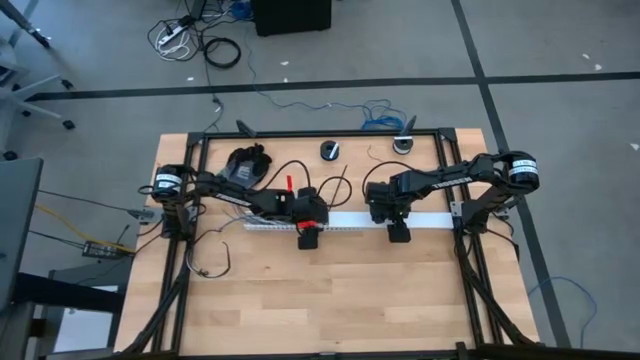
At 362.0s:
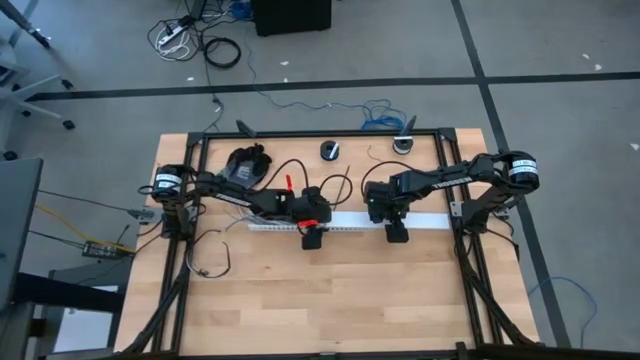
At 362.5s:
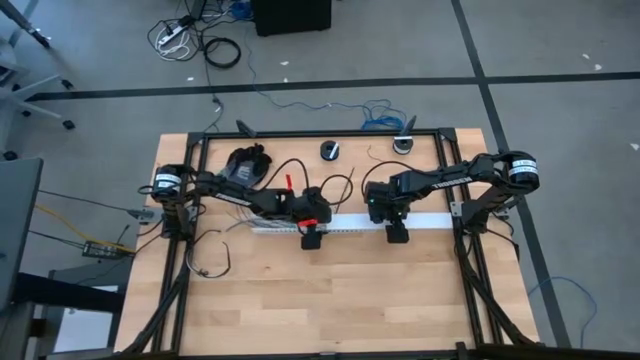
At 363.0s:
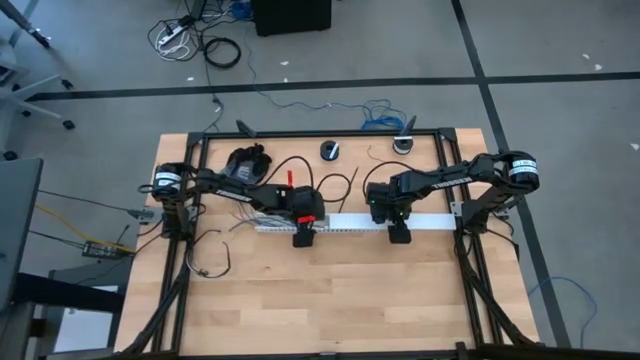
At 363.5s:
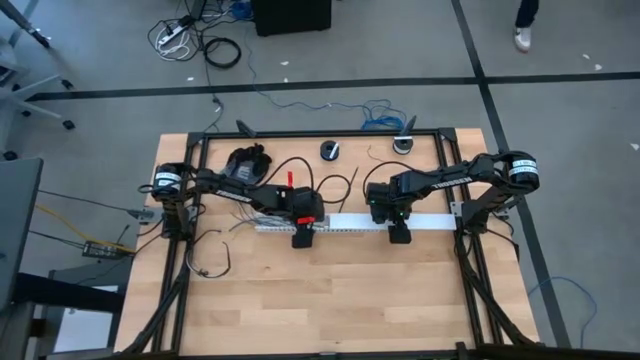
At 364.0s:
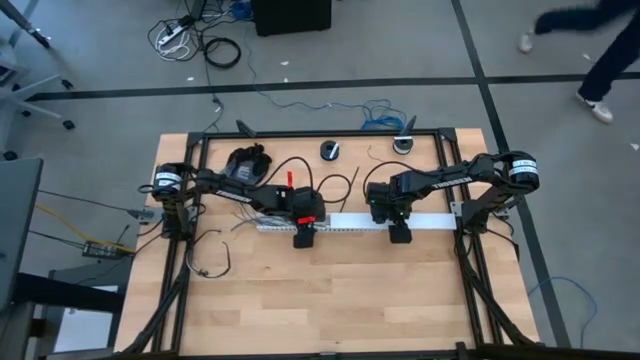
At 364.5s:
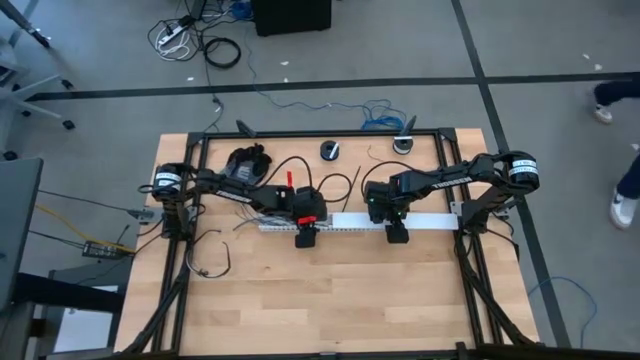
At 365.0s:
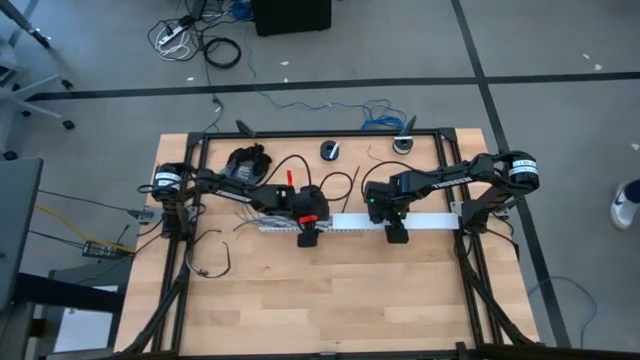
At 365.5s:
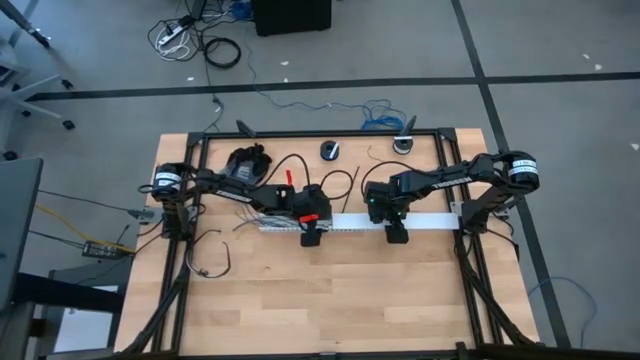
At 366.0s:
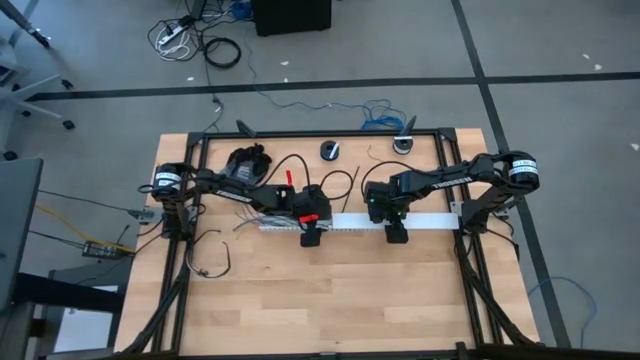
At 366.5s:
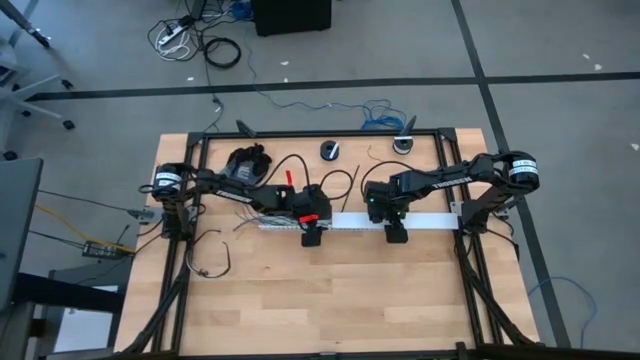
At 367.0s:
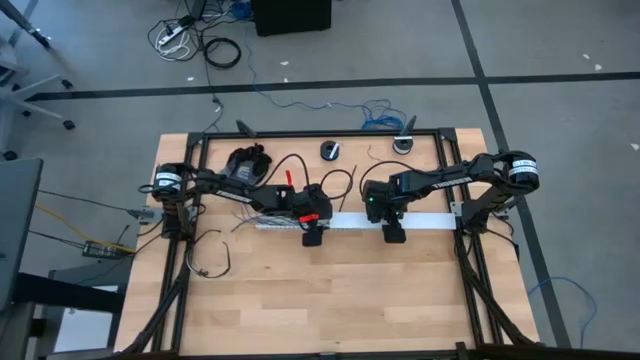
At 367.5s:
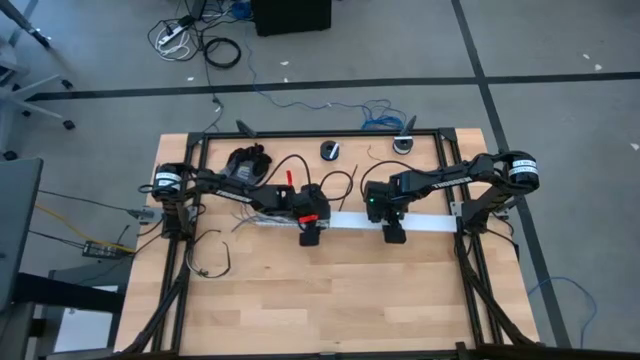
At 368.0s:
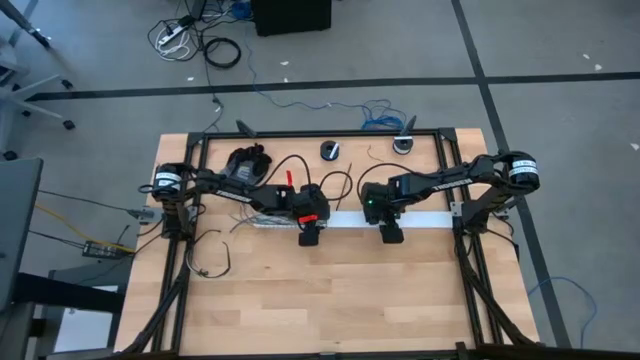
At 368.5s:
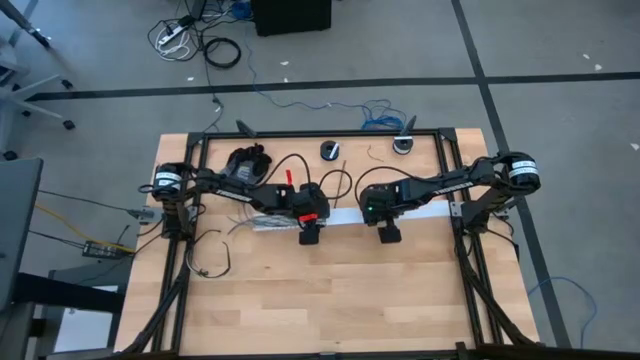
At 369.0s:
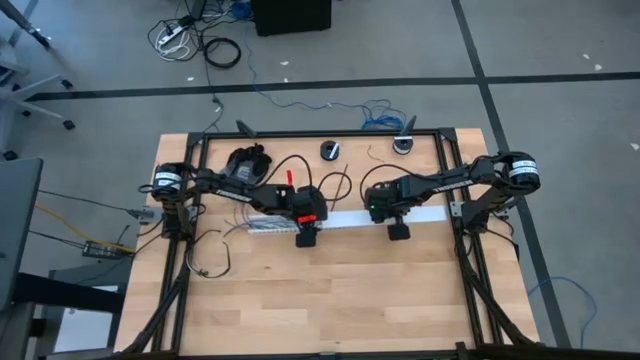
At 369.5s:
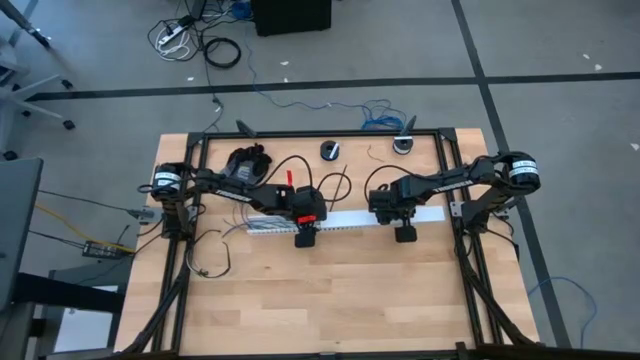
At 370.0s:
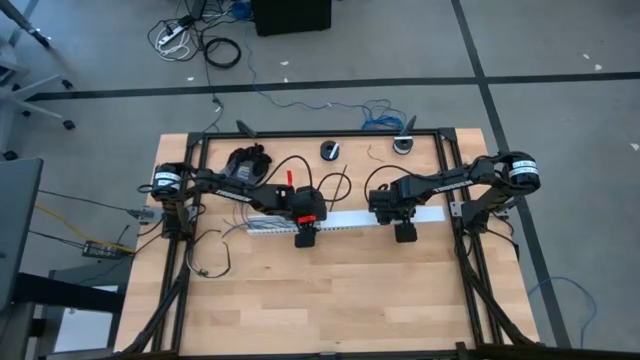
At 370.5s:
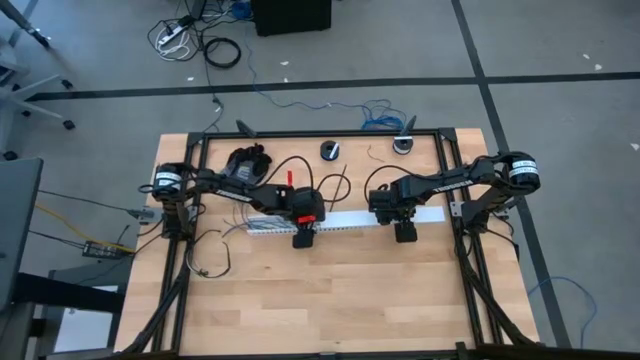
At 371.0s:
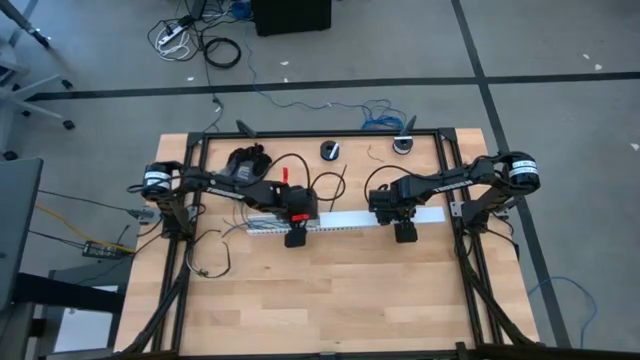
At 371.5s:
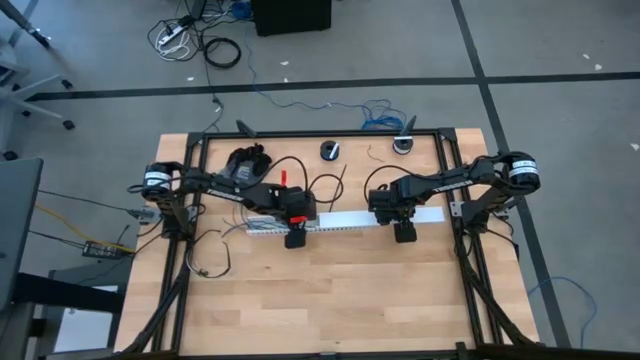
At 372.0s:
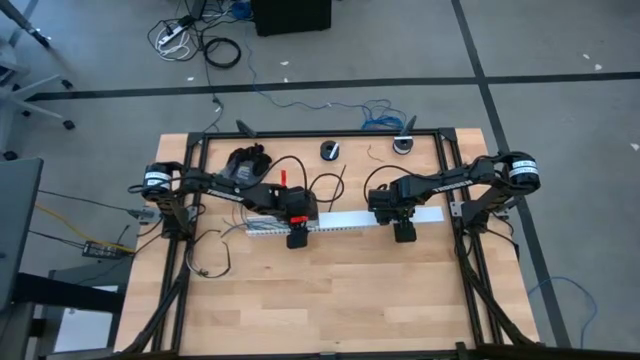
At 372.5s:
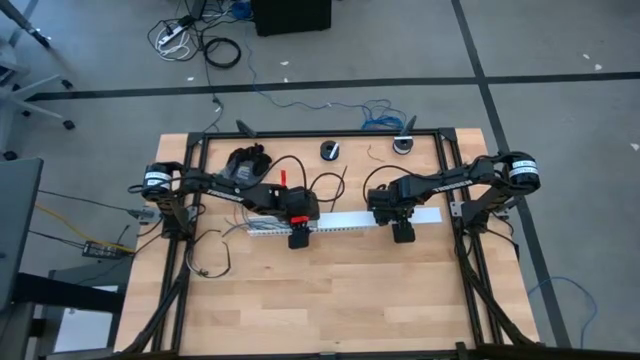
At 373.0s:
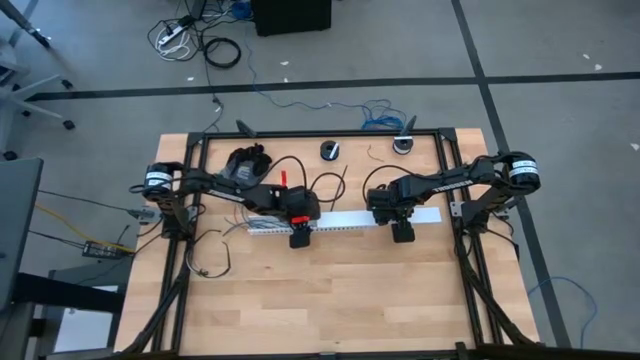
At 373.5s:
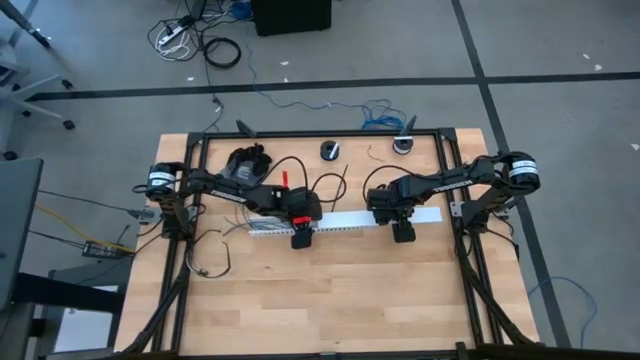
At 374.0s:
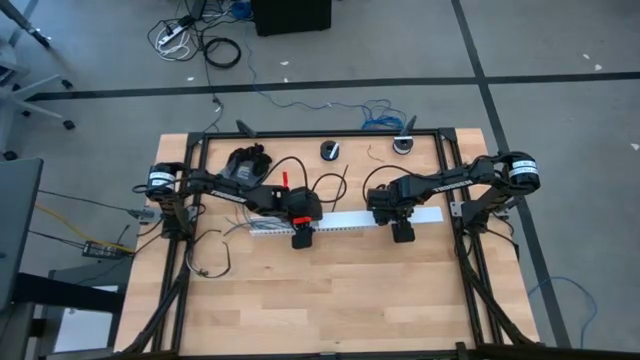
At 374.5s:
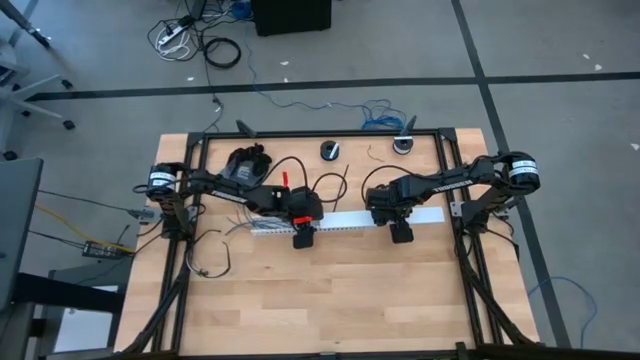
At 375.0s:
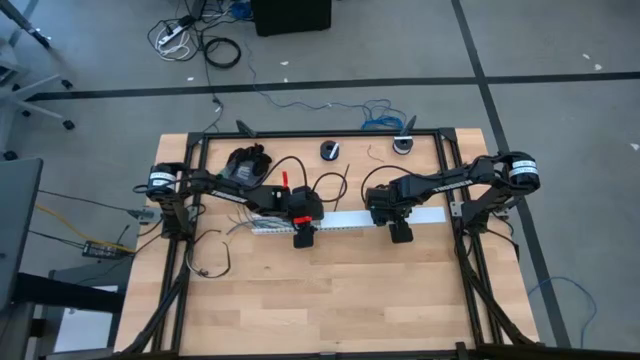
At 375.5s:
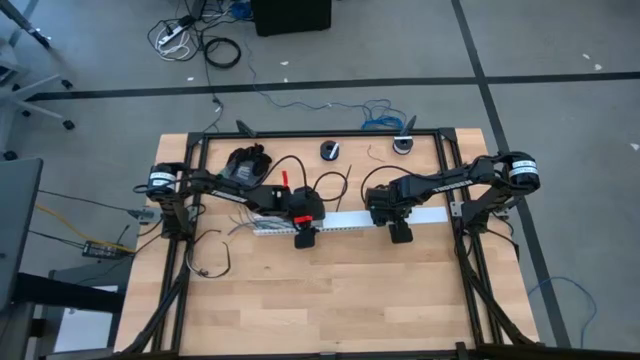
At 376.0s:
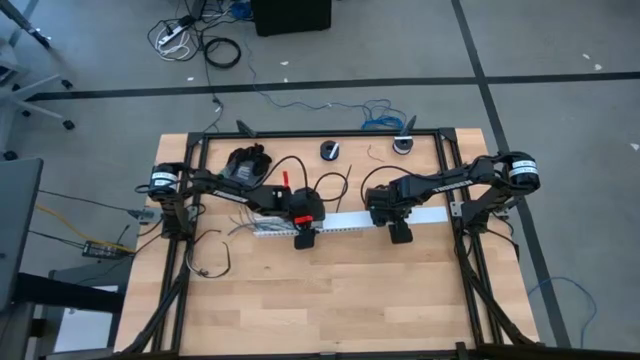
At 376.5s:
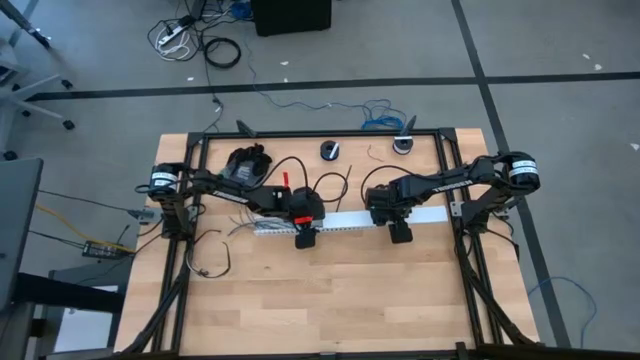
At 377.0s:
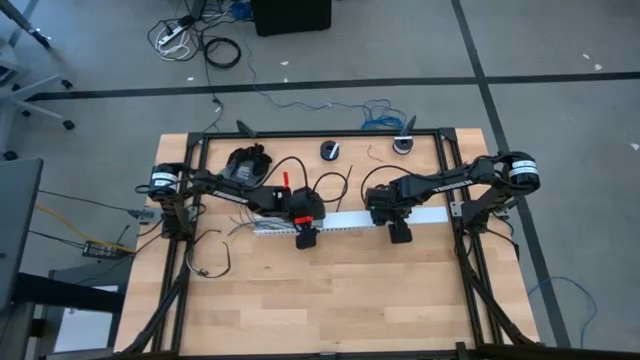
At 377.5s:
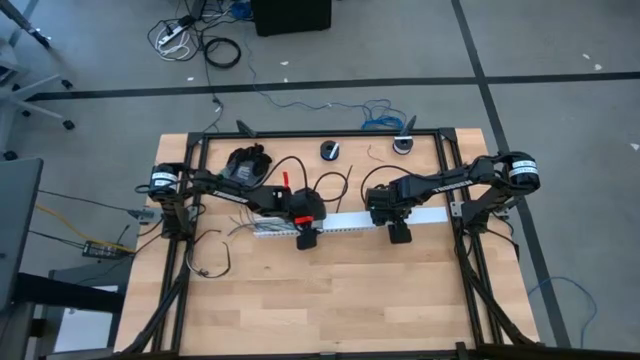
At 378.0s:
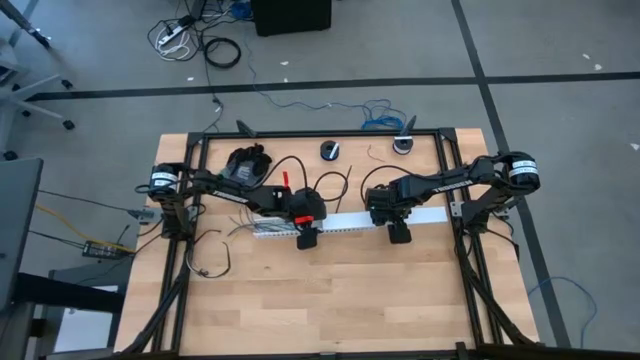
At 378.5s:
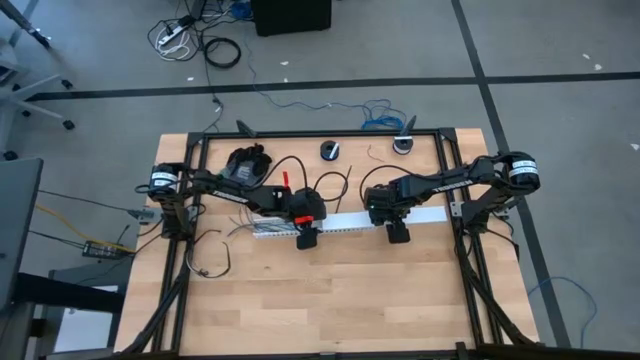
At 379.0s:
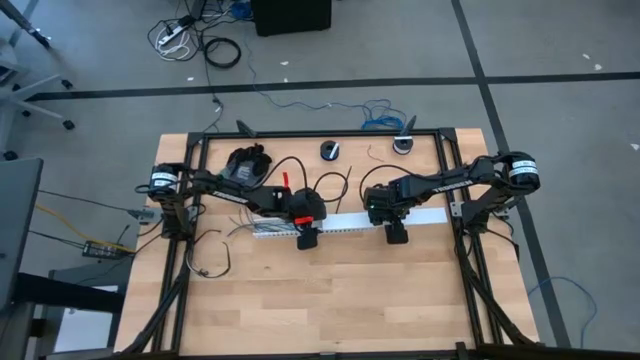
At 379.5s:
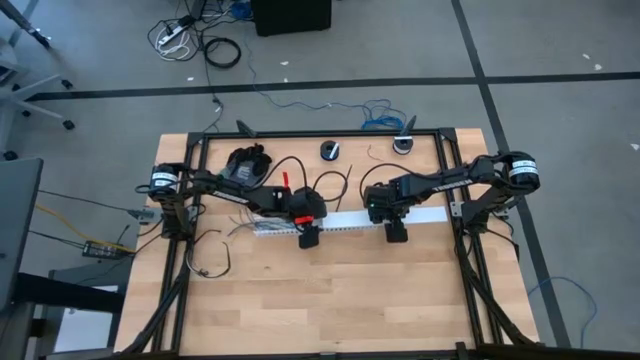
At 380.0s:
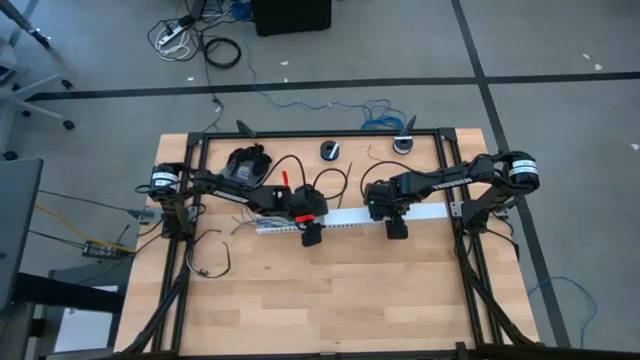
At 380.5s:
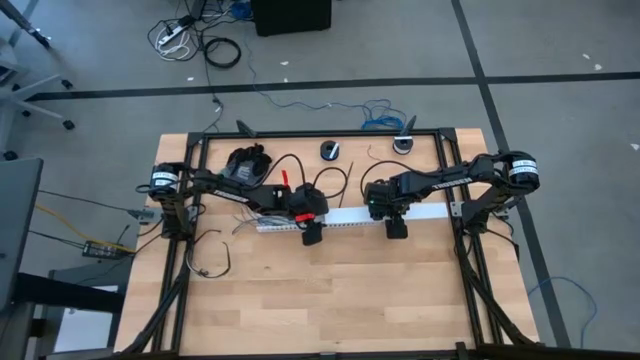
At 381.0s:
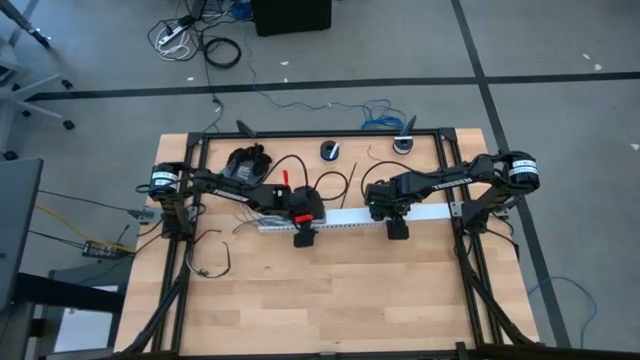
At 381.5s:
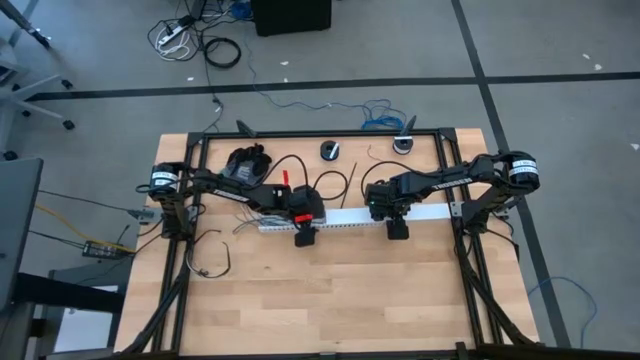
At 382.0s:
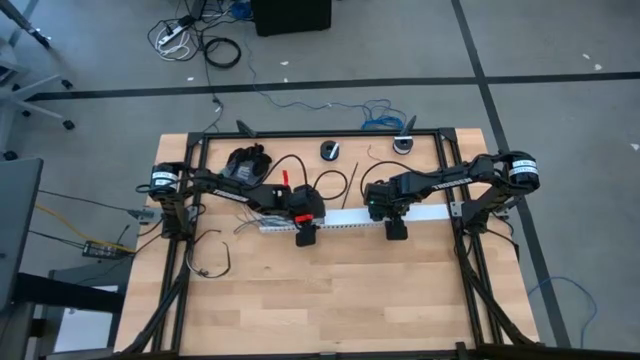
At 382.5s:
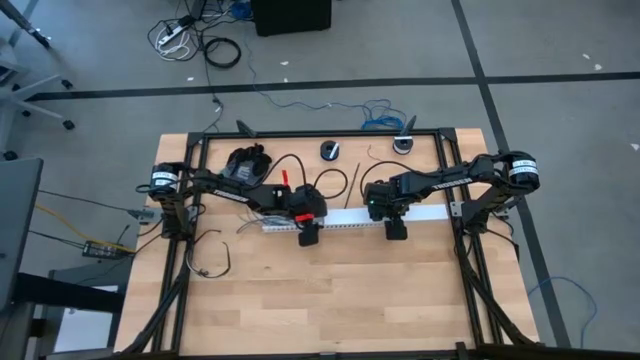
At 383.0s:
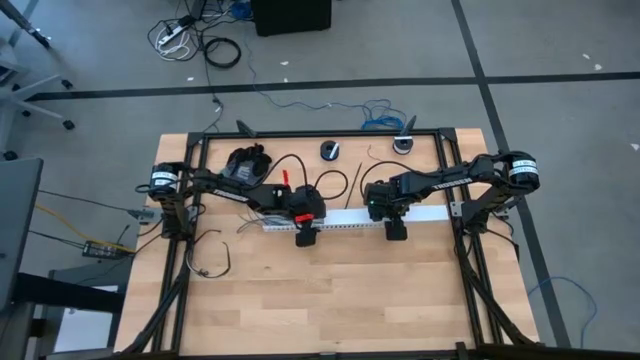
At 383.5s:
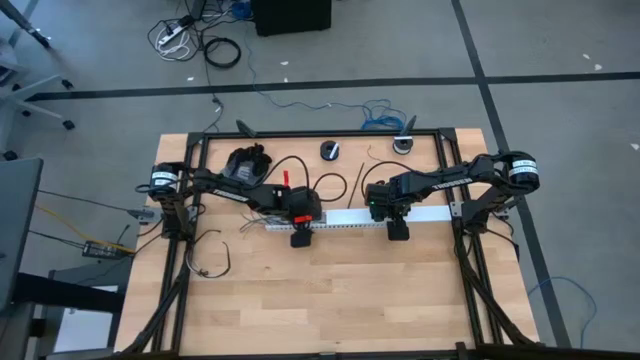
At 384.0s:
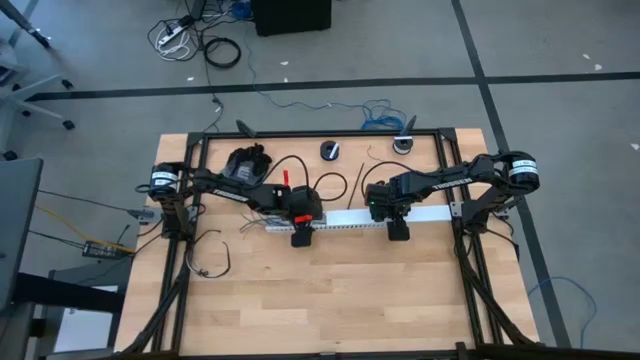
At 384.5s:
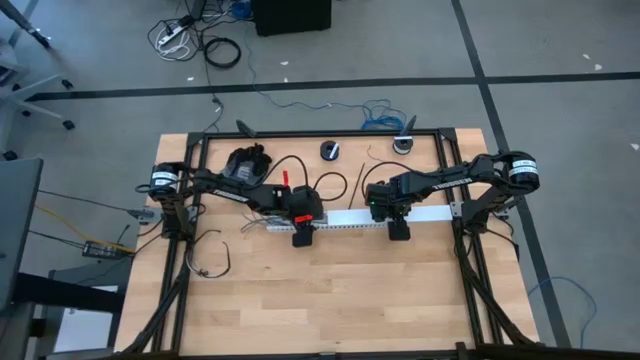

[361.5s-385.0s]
Task: Ziptie cables
Close the white cable duct
